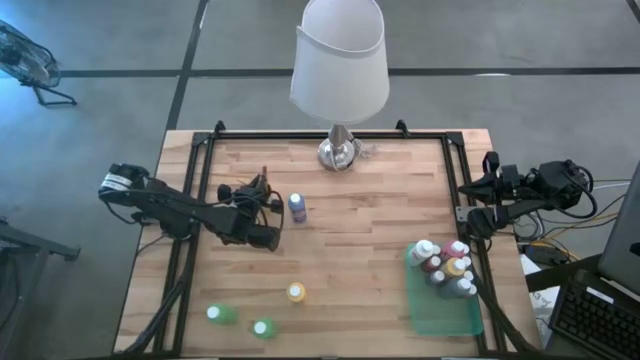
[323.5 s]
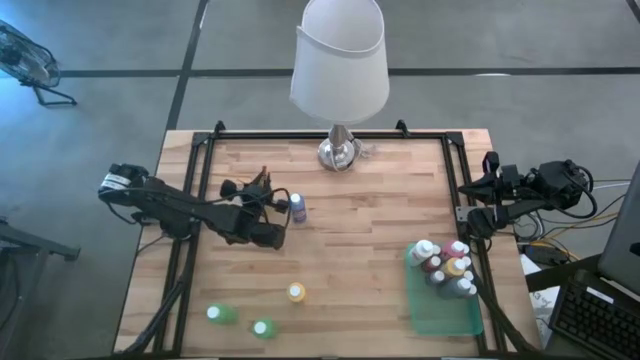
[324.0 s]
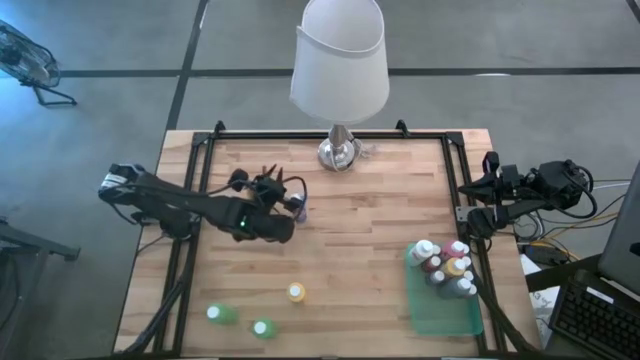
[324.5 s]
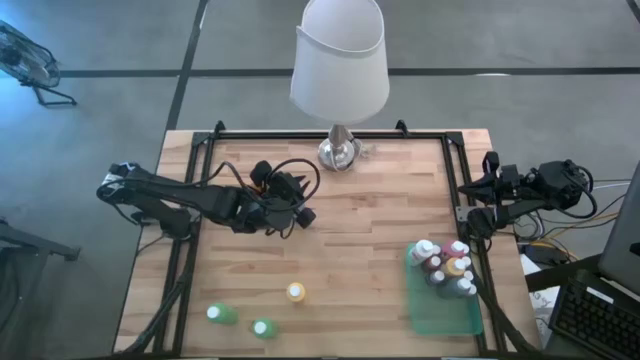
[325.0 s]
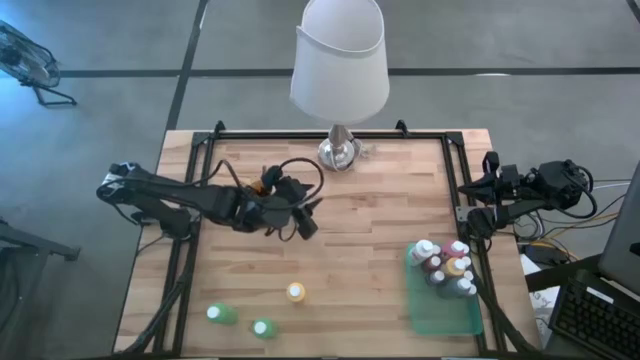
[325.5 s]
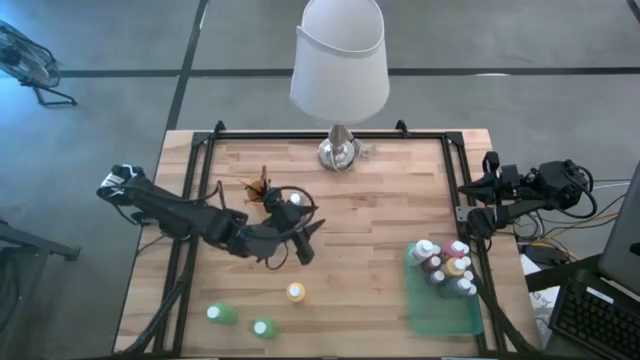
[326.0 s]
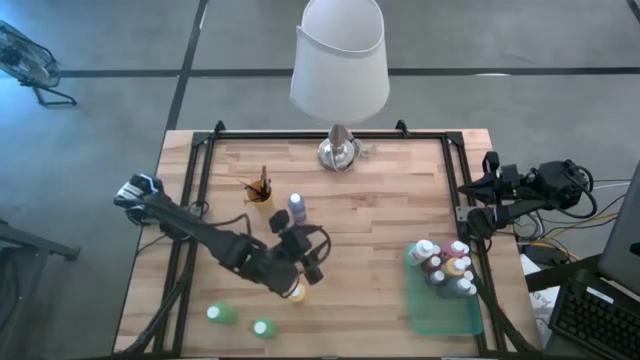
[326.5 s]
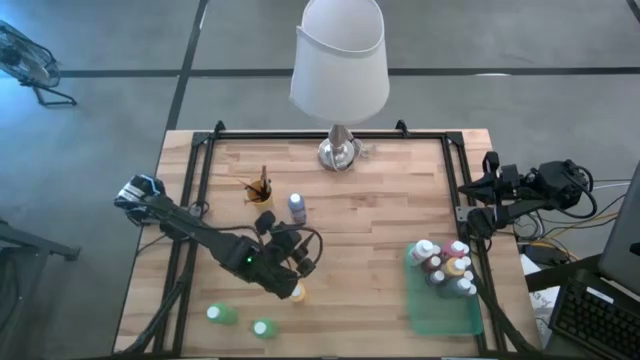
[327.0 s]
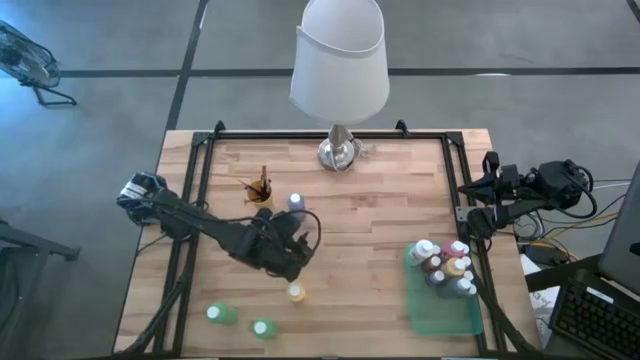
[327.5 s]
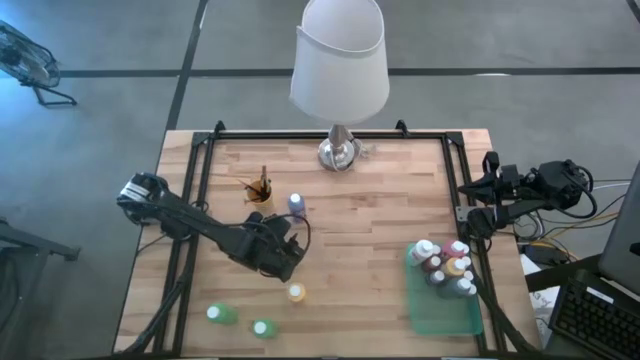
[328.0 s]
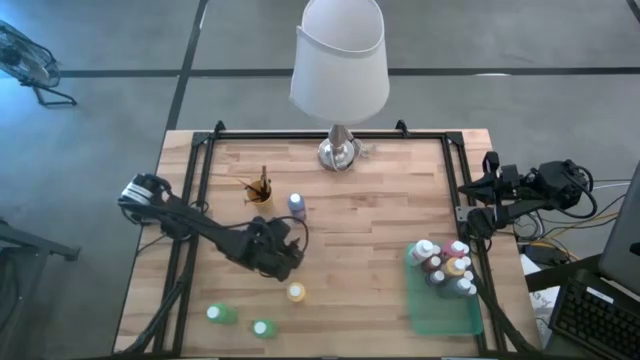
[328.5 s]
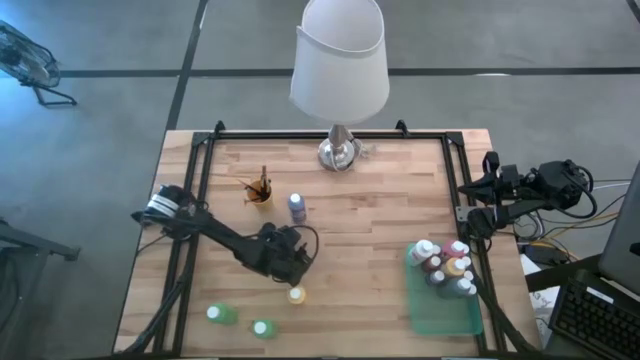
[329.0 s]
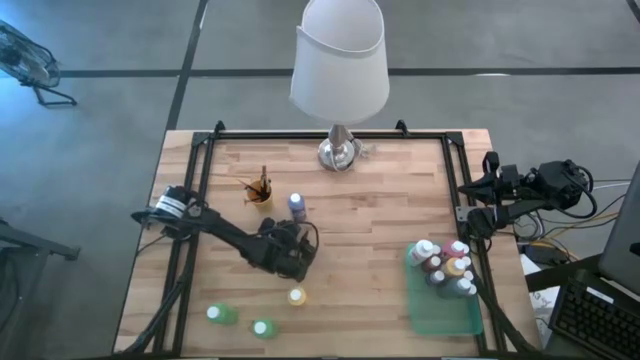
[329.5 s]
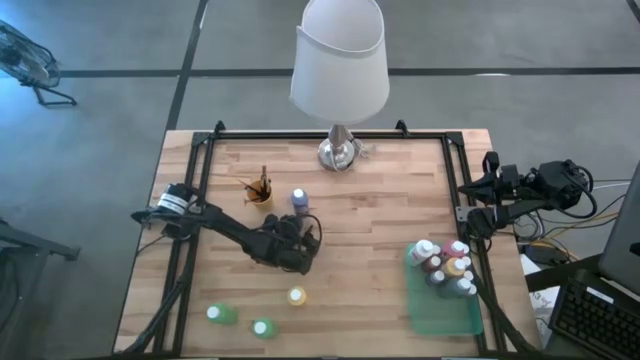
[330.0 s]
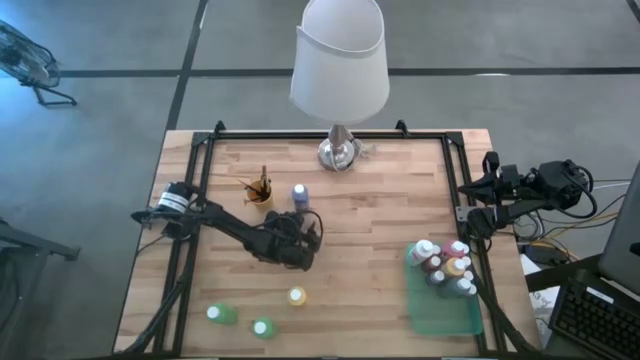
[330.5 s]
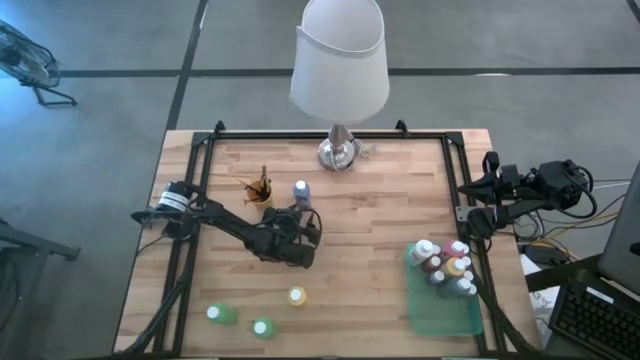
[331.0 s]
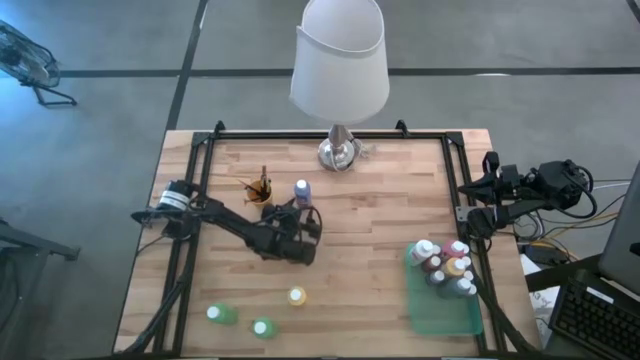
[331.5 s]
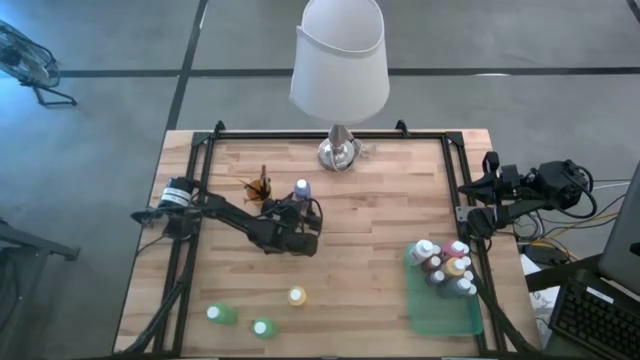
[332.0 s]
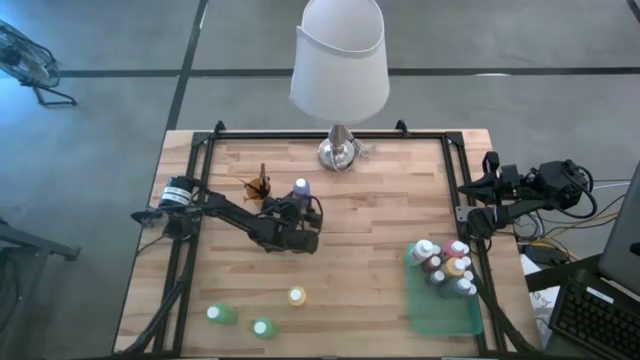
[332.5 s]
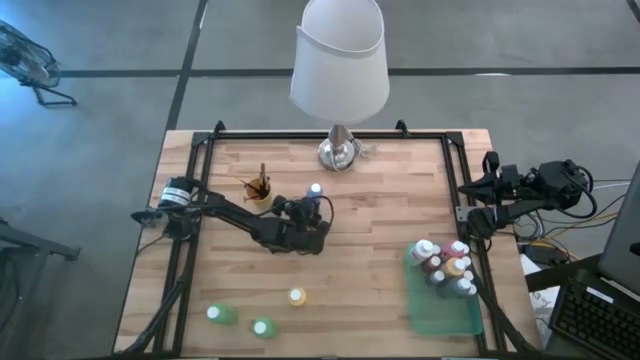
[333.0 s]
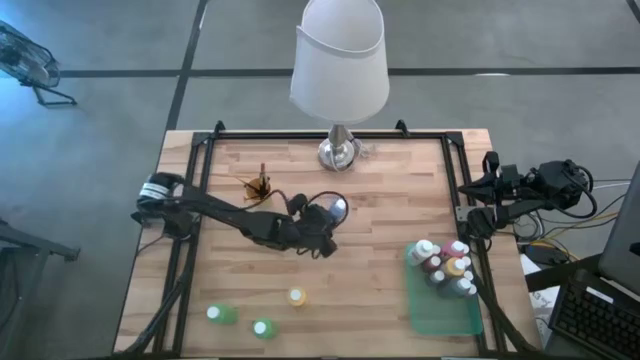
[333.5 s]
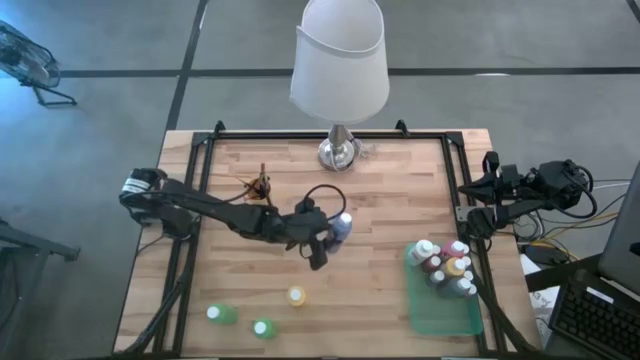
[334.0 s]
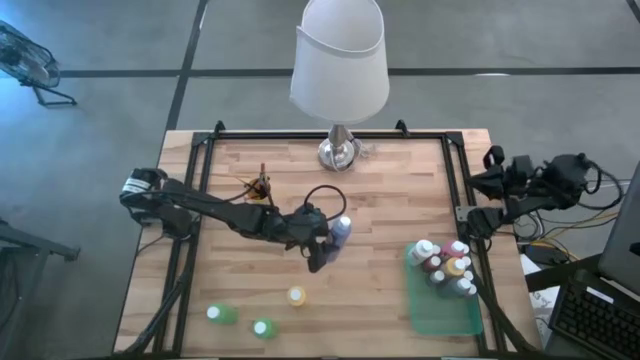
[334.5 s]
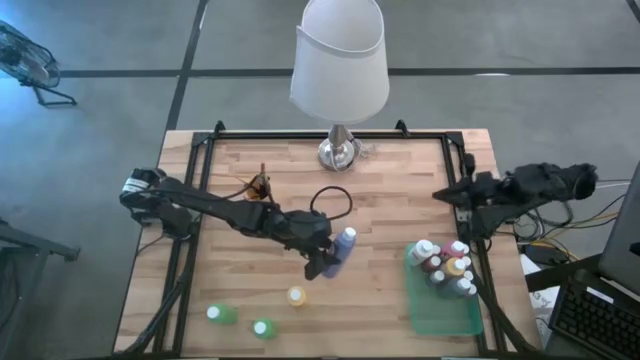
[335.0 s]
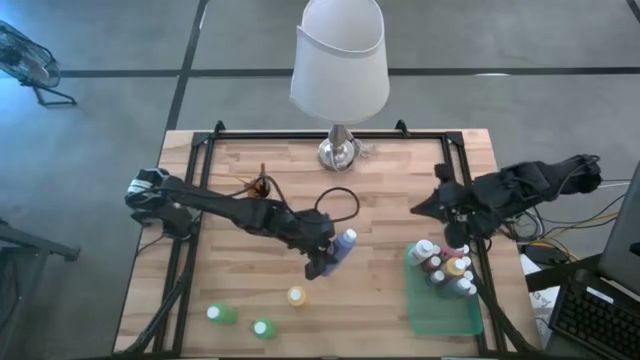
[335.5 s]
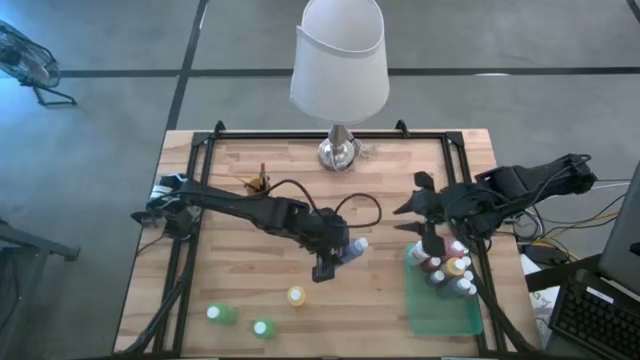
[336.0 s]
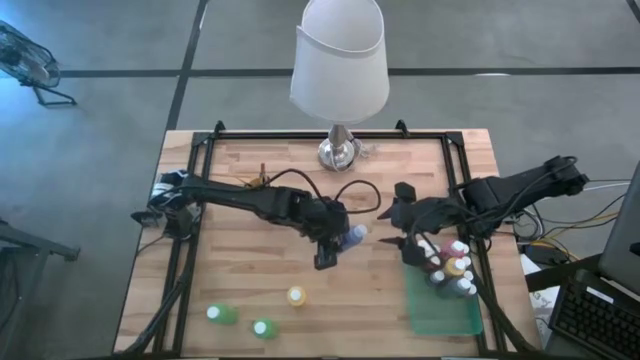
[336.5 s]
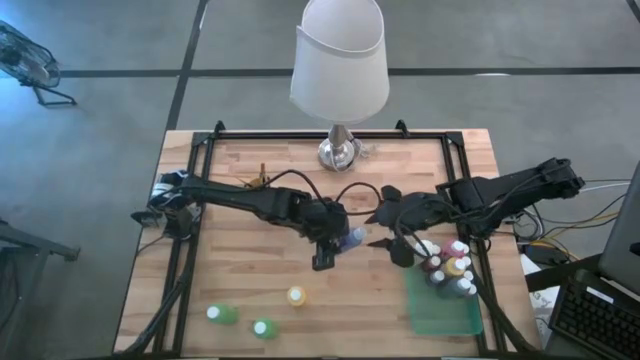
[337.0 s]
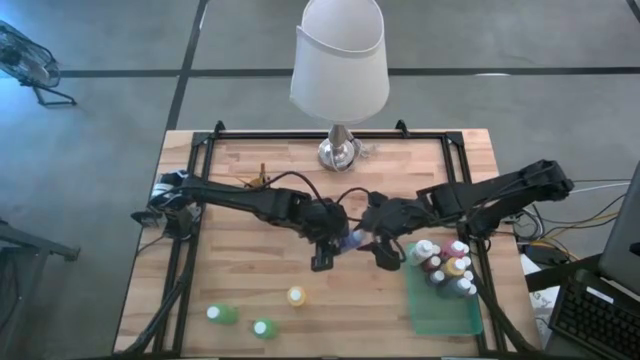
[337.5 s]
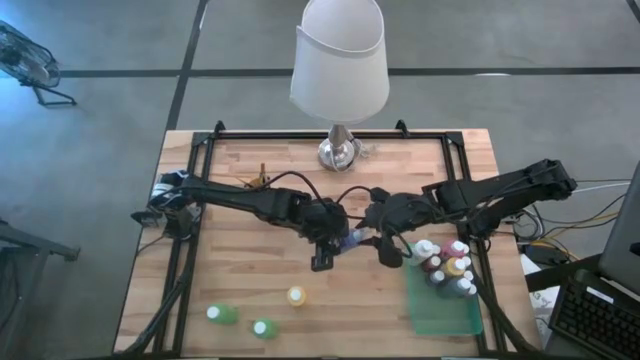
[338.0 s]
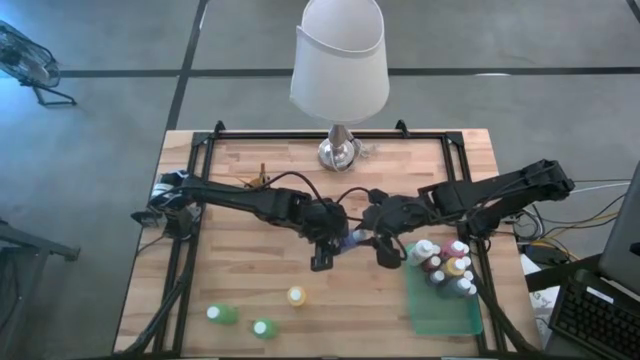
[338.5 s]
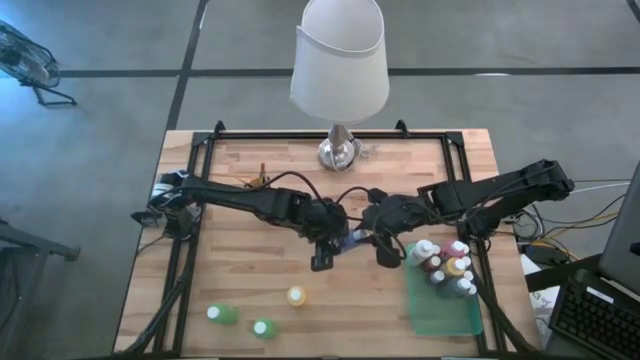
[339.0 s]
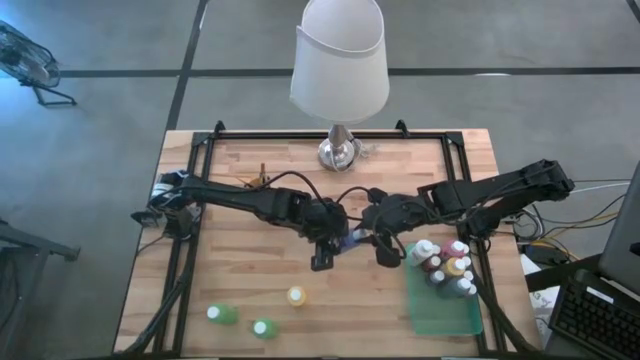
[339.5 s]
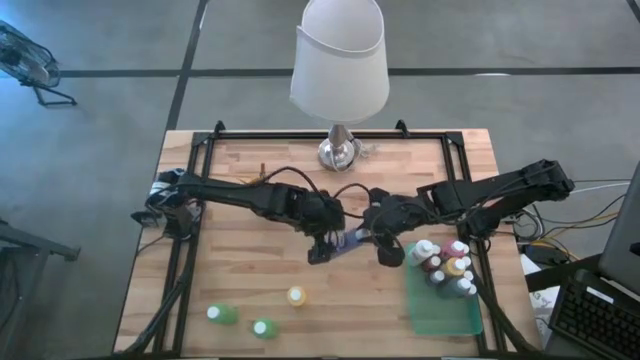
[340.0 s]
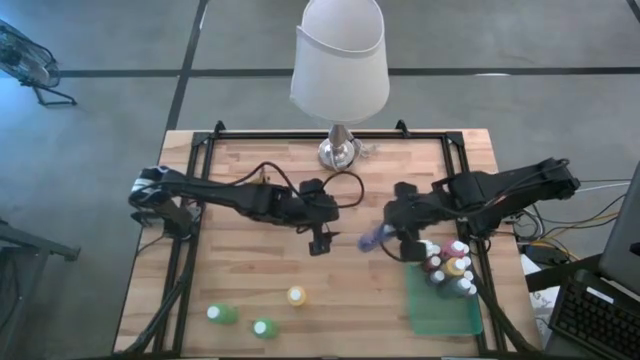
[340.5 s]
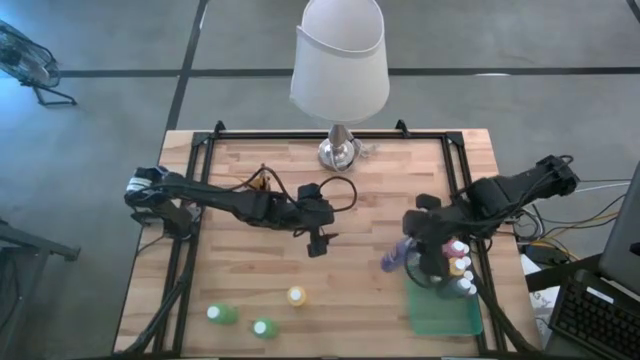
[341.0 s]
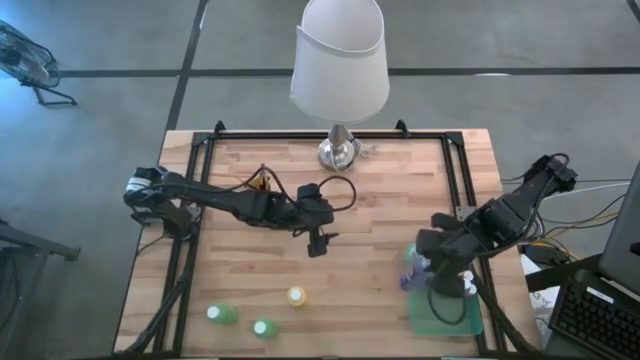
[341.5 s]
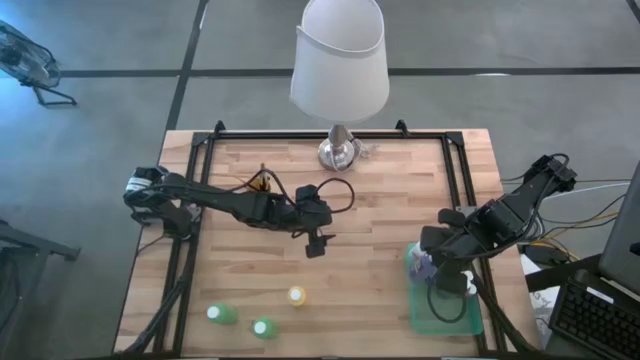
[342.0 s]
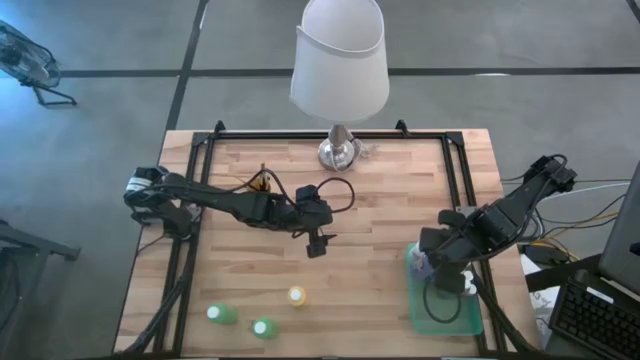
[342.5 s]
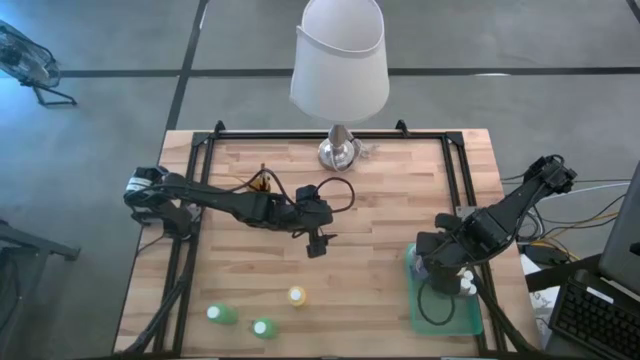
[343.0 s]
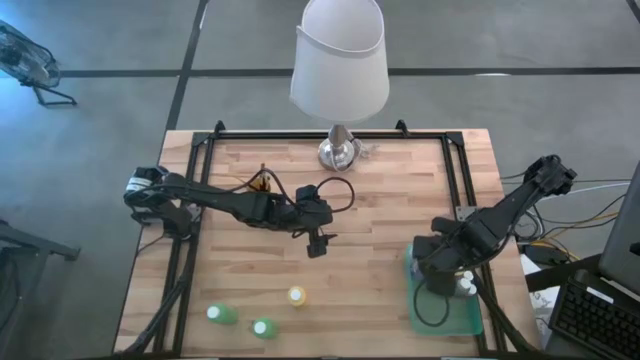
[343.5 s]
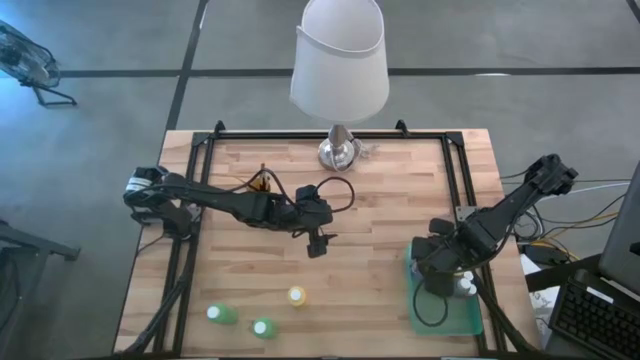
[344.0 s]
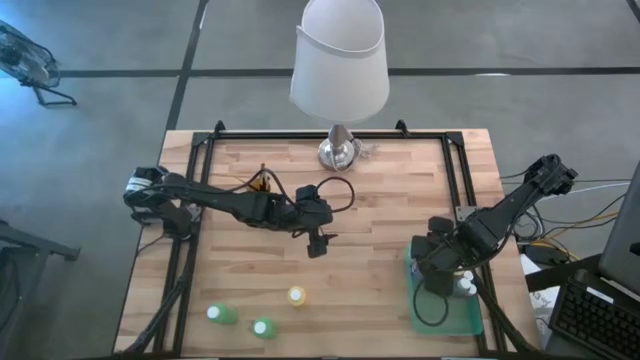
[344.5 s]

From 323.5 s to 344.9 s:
Task: Pick & Place Paint Supplies
Put the blue paint bottle into the green bin
